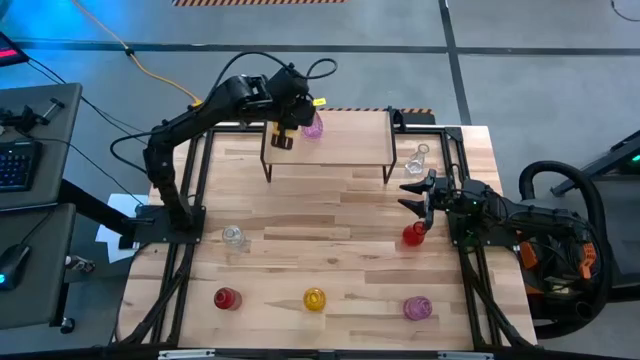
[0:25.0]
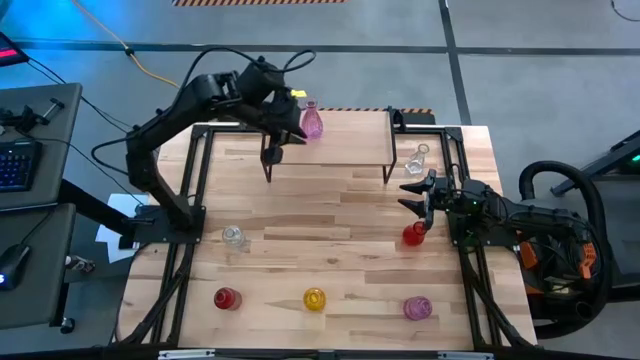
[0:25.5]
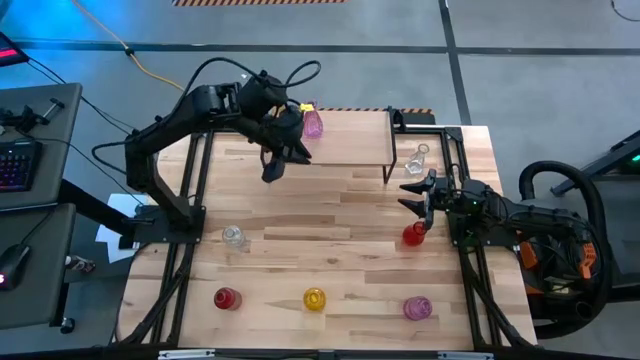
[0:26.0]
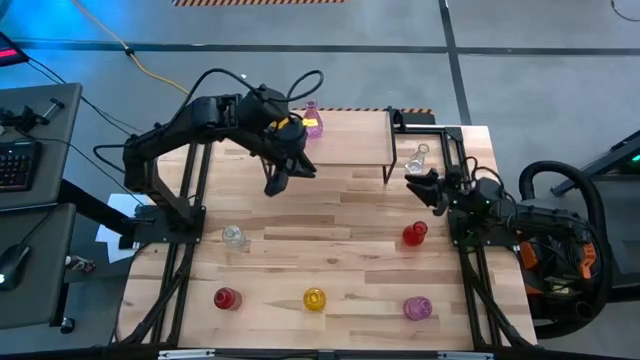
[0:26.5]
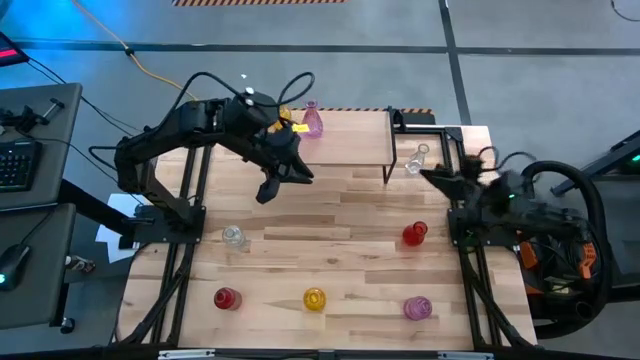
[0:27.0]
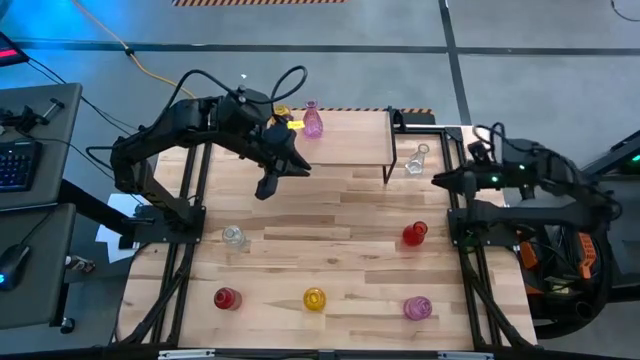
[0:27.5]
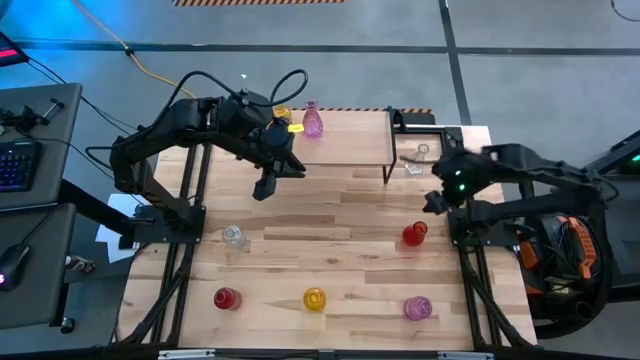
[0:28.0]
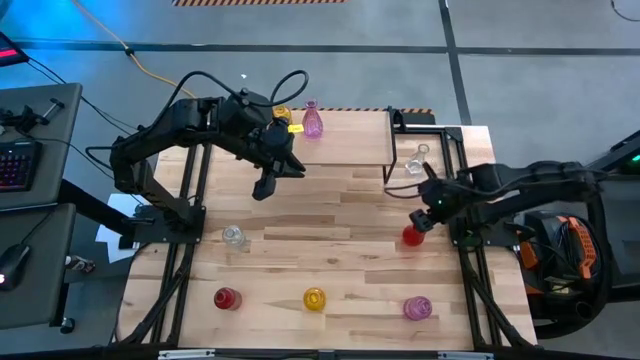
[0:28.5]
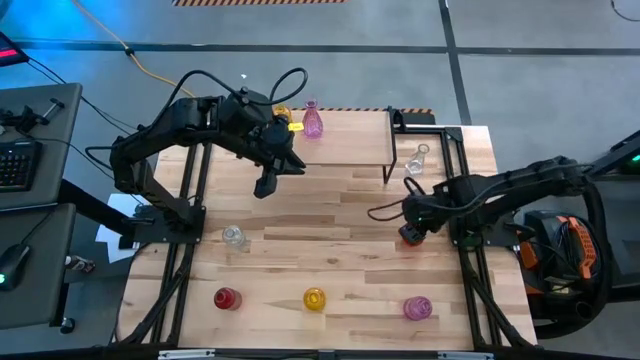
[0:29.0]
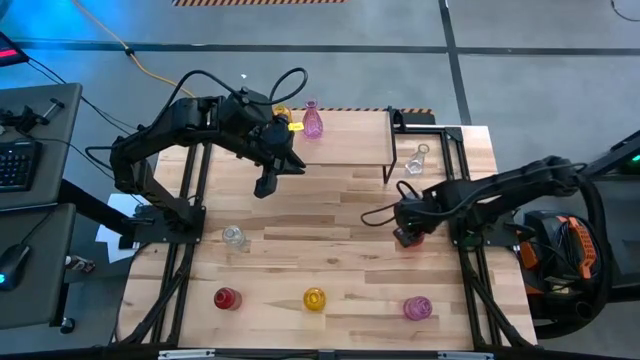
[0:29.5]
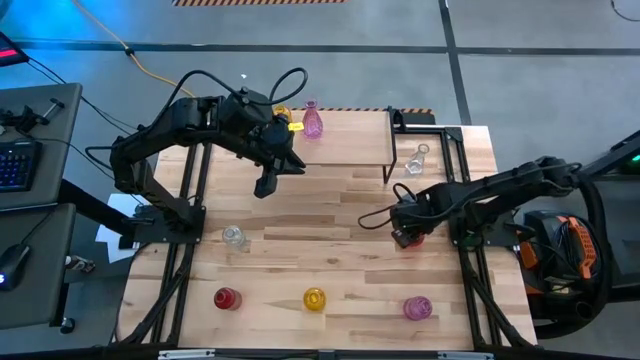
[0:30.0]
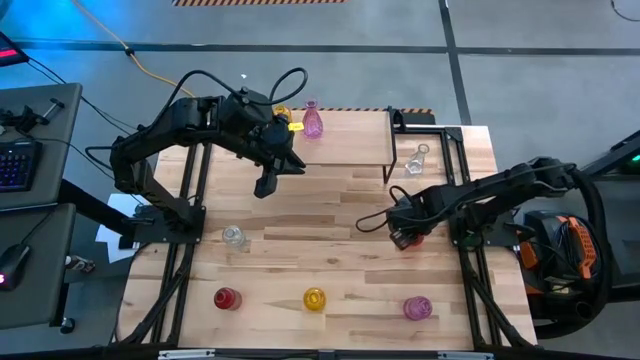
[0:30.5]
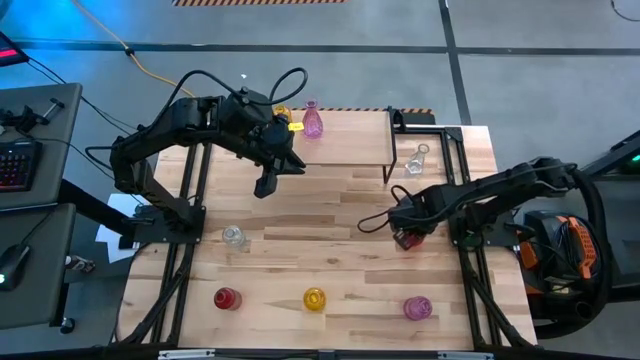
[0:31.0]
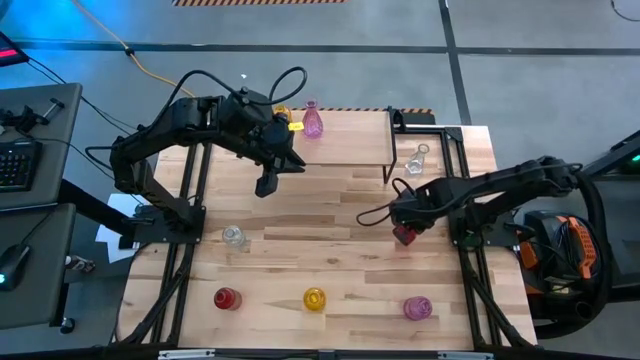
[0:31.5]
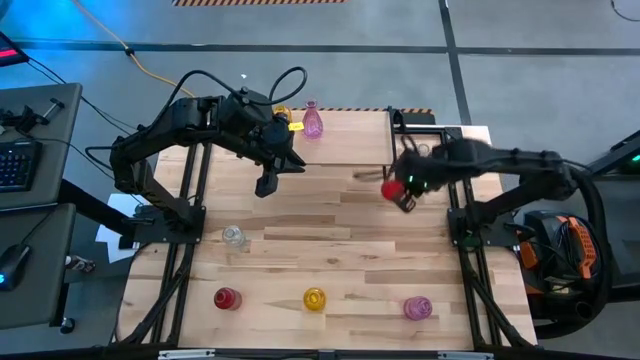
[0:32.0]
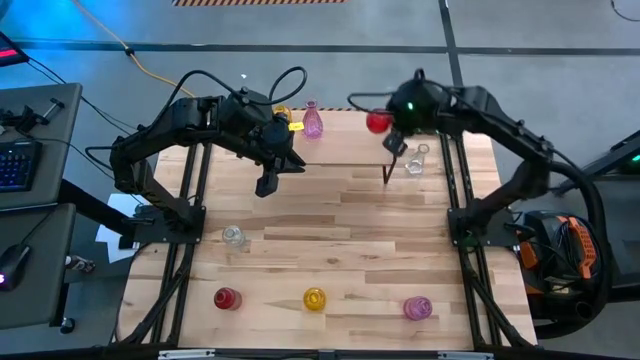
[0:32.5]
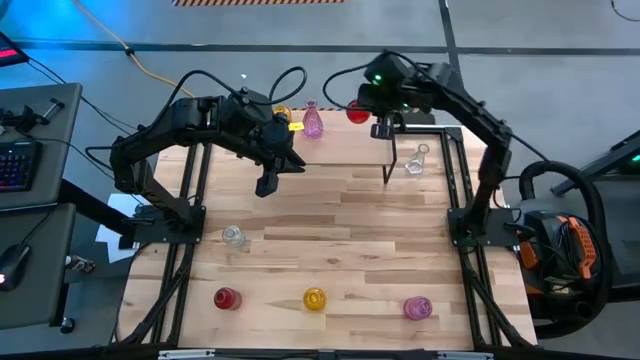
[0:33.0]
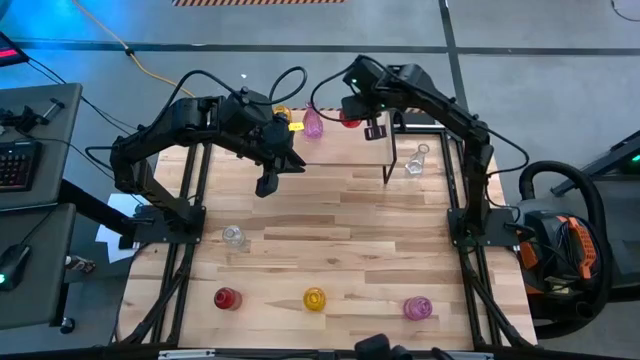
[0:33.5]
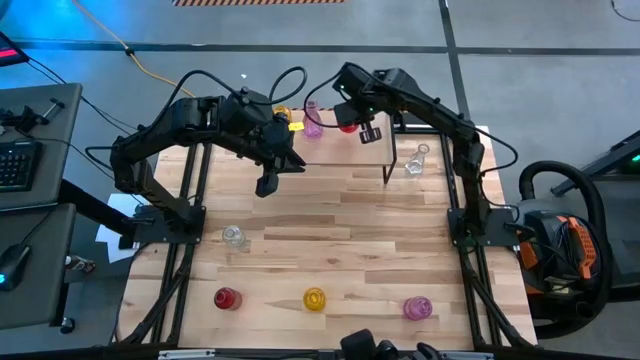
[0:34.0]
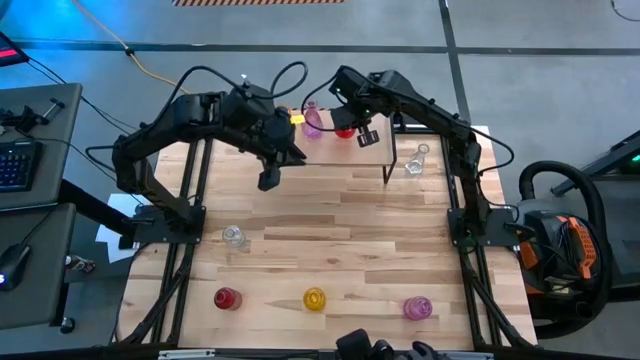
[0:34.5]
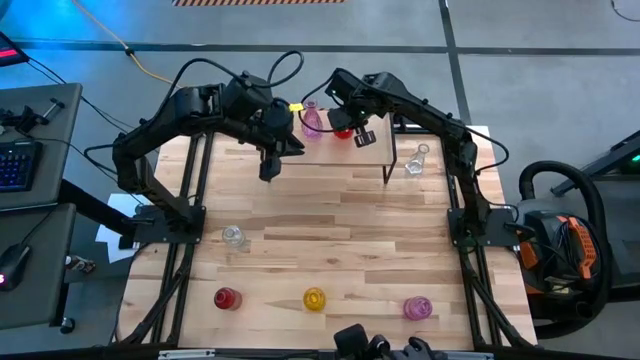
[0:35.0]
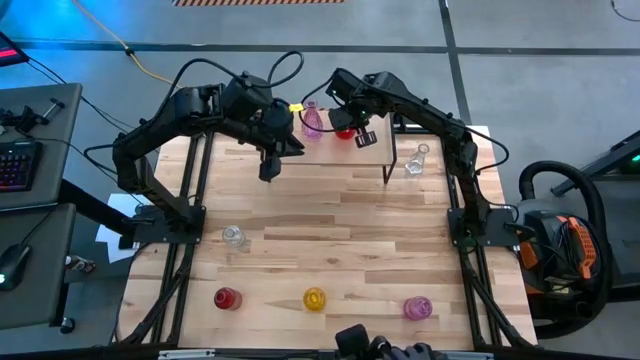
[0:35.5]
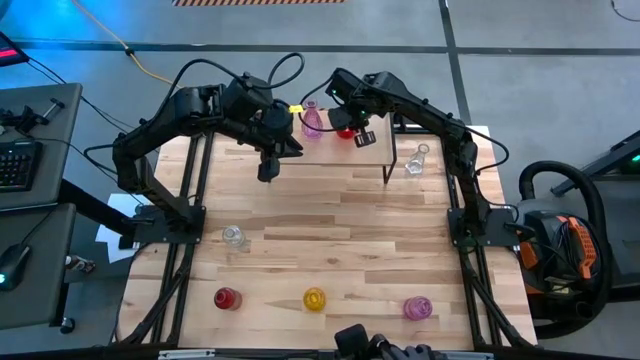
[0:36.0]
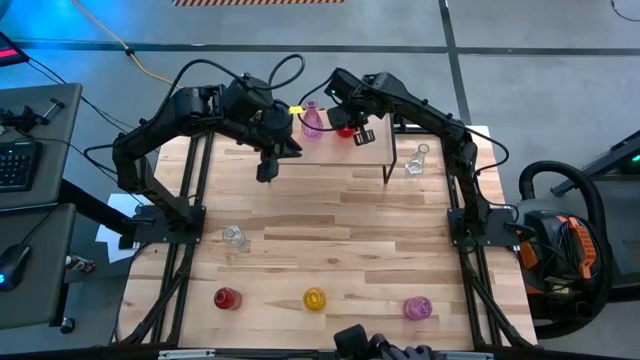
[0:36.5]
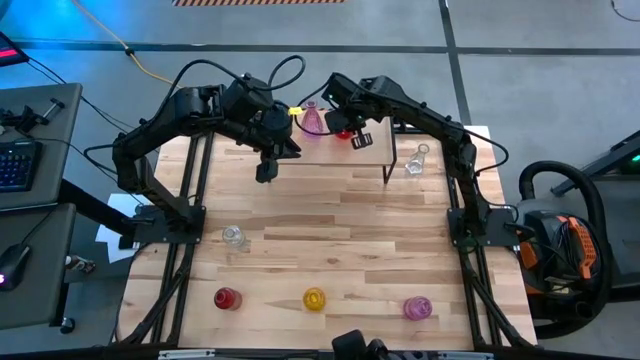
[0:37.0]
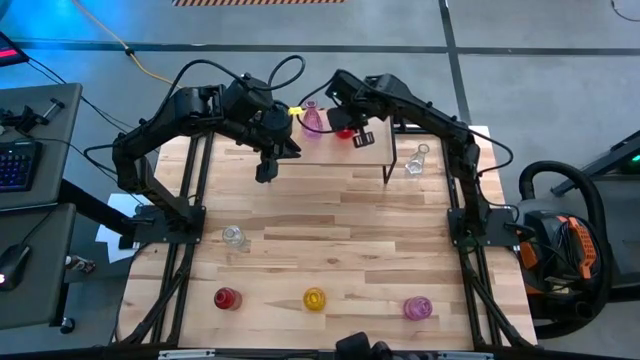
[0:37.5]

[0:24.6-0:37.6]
Task: sort vases onto shelf
Put the right red vase on the shelf

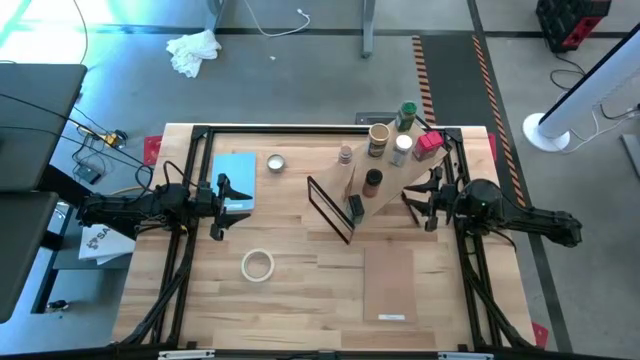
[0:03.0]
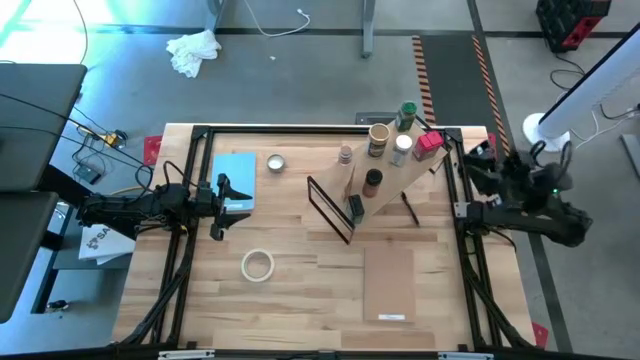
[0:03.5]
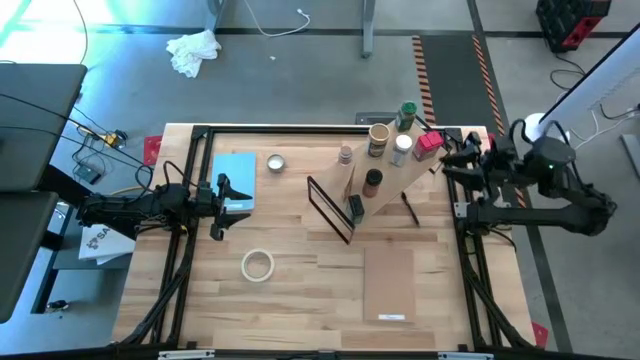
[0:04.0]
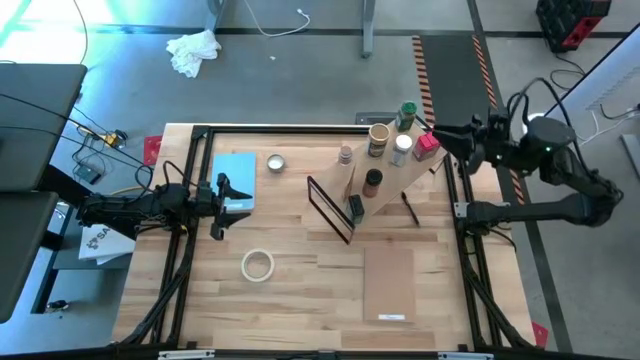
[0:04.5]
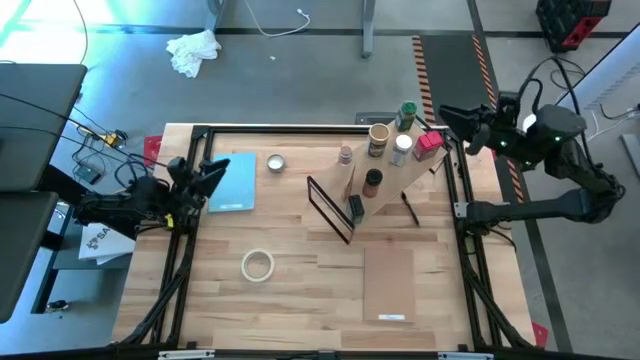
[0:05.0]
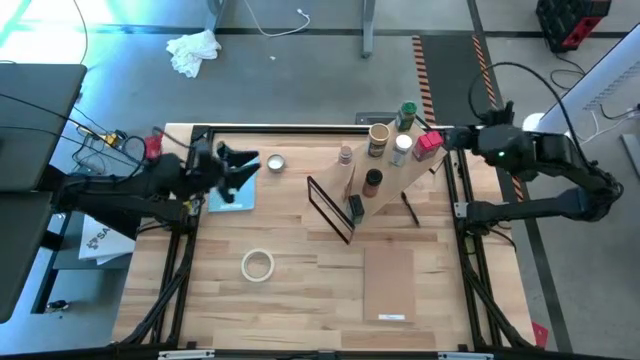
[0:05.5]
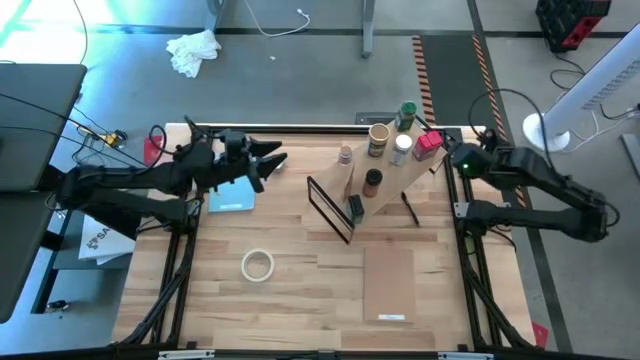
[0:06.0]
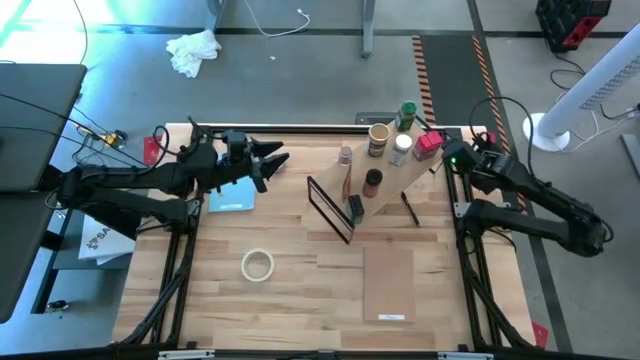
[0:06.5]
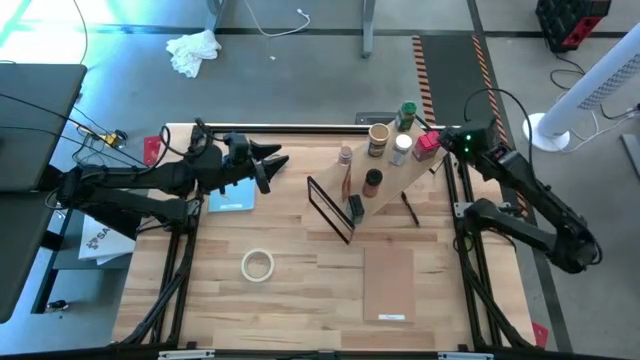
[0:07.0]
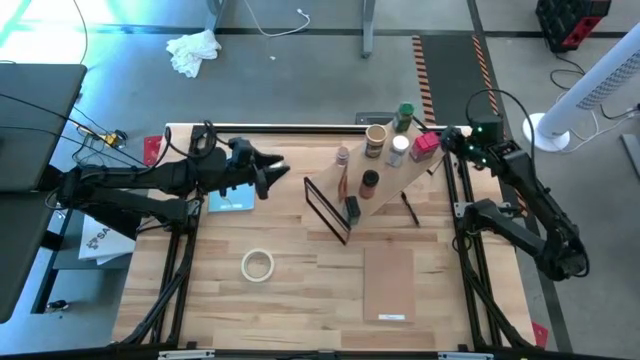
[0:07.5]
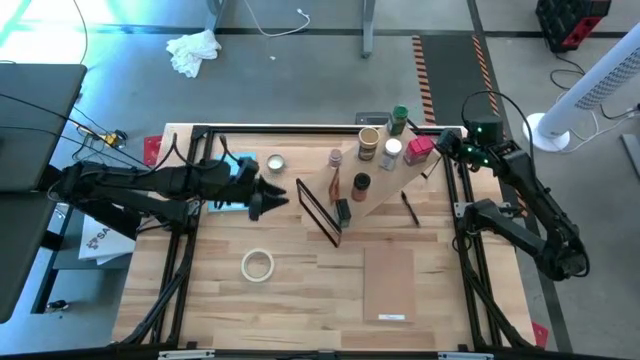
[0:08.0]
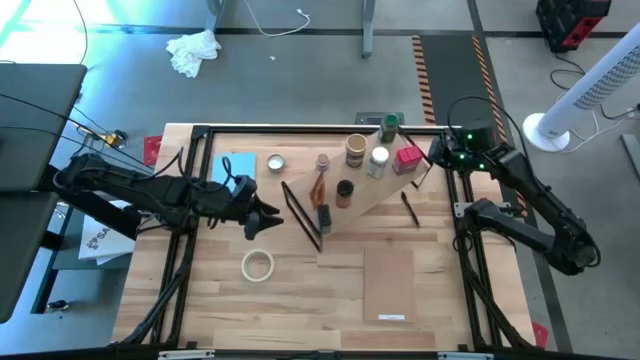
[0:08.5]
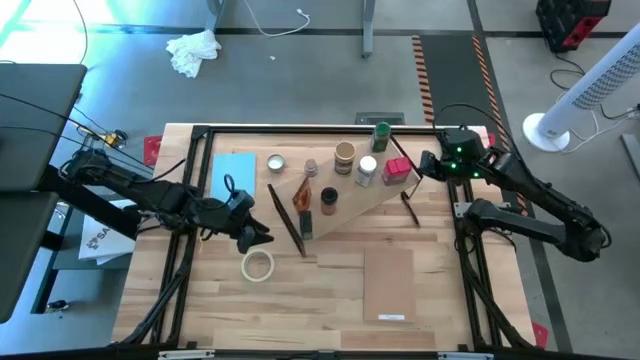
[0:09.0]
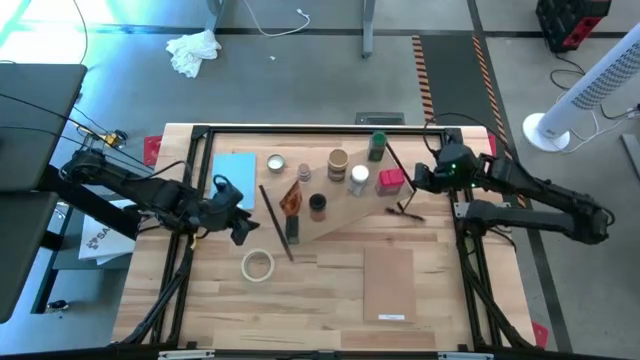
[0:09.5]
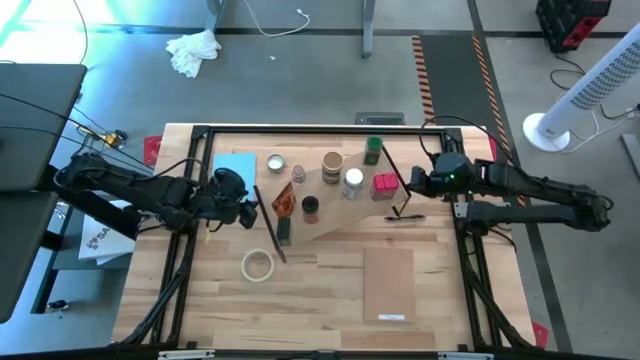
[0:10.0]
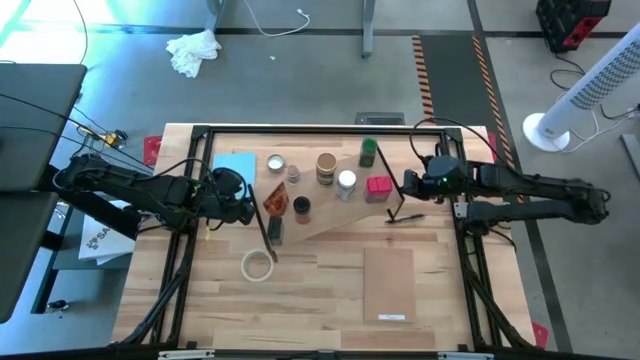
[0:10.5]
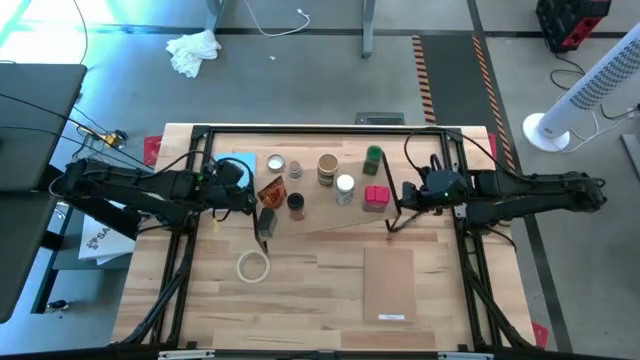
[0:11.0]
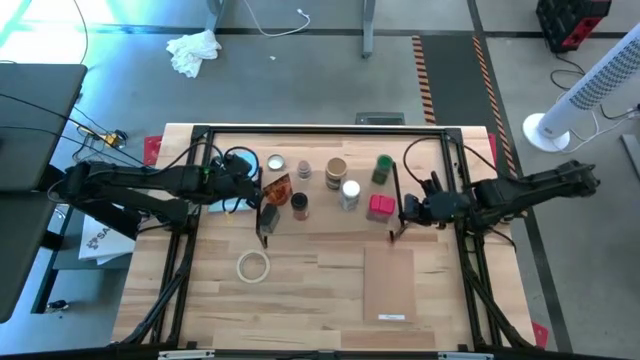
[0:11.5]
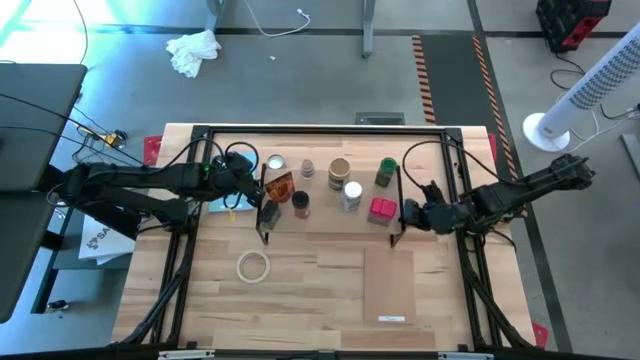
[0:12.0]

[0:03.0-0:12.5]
Task: Shelf spices
Move the shelf to the center of the table
